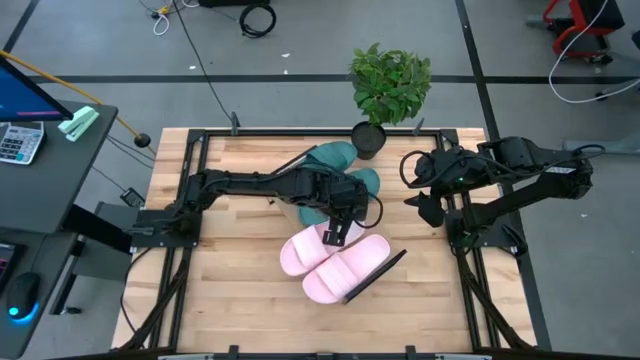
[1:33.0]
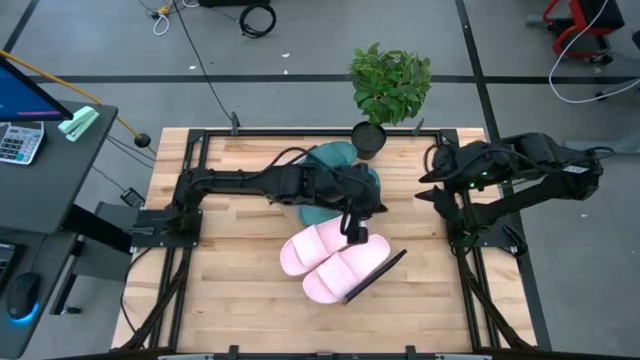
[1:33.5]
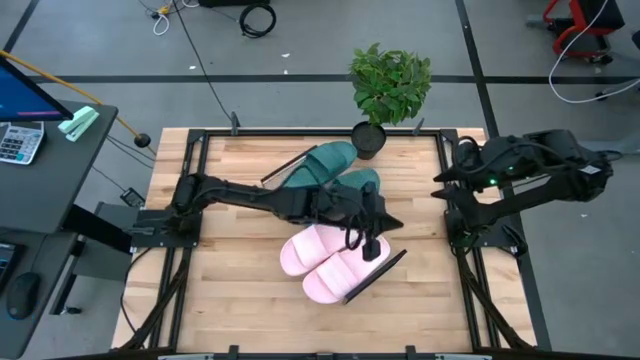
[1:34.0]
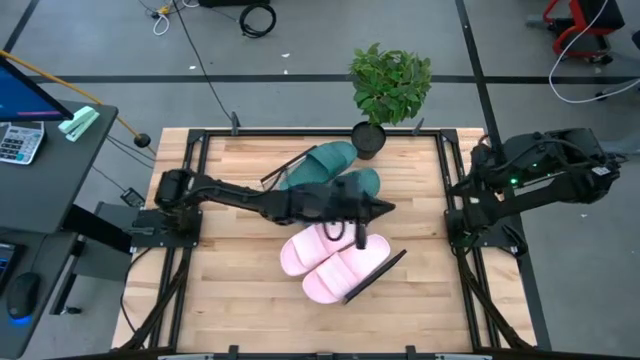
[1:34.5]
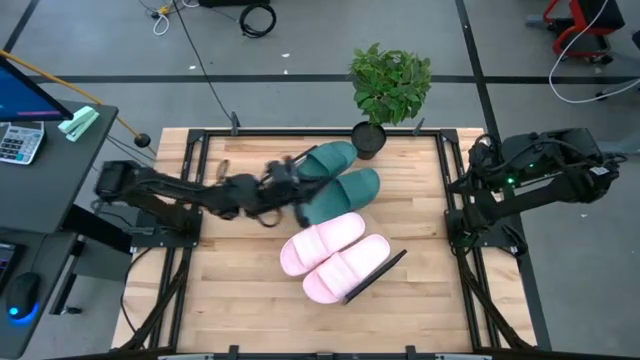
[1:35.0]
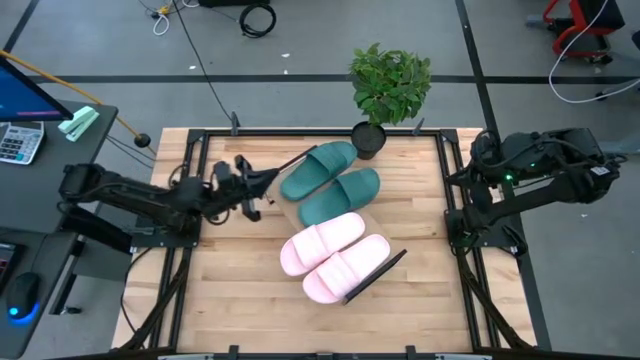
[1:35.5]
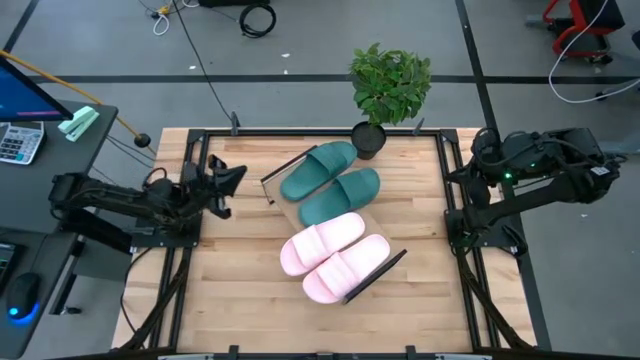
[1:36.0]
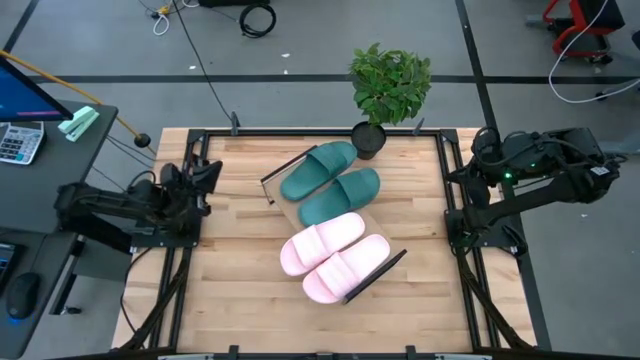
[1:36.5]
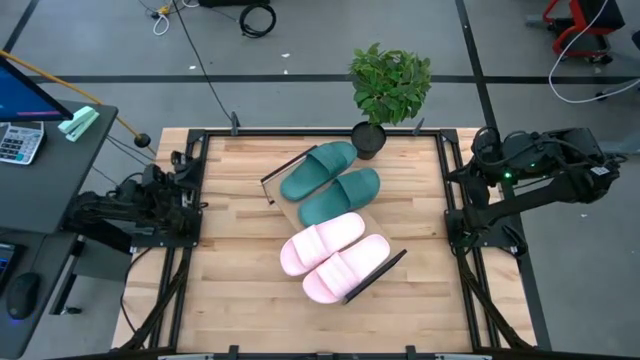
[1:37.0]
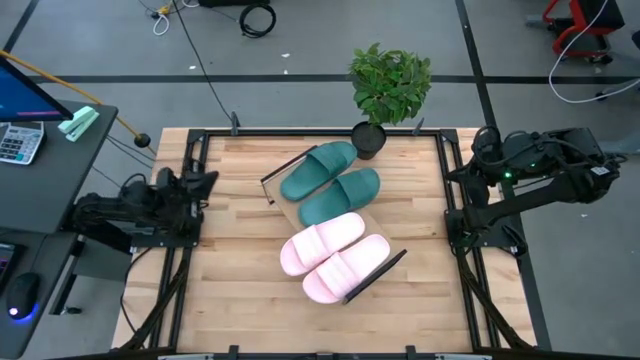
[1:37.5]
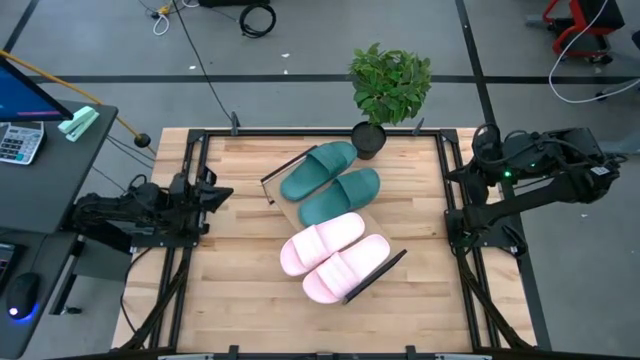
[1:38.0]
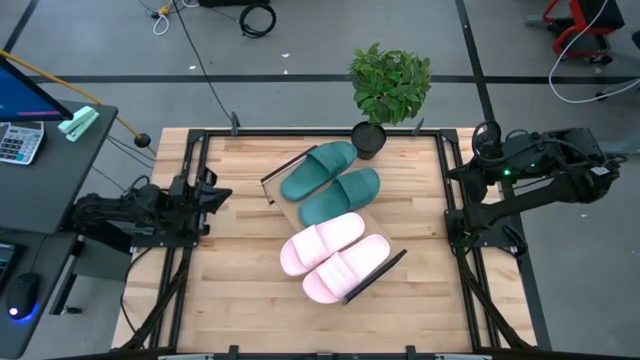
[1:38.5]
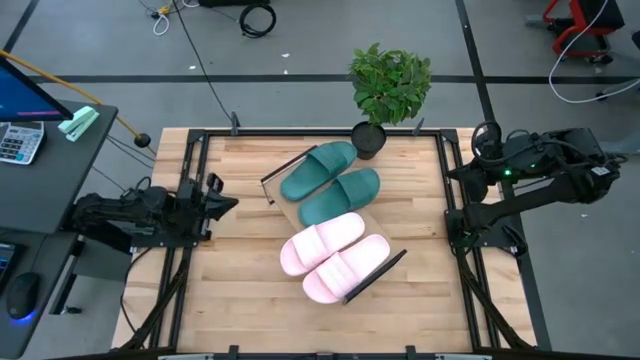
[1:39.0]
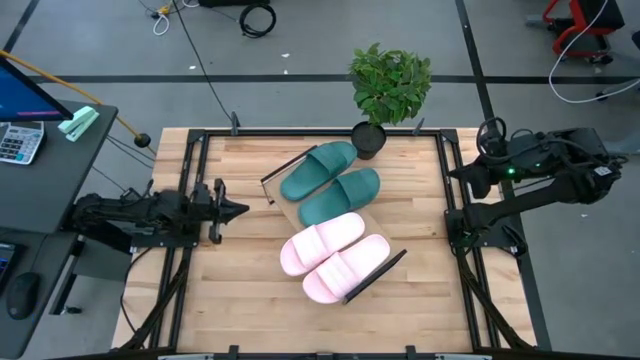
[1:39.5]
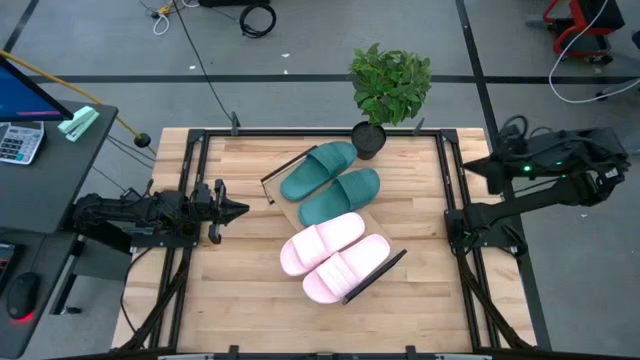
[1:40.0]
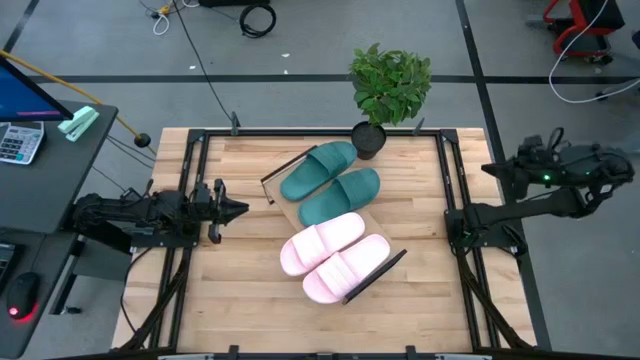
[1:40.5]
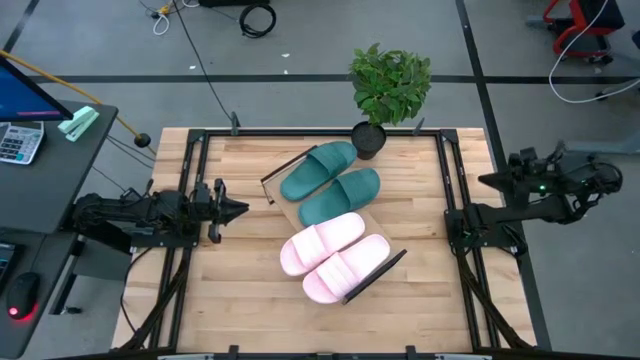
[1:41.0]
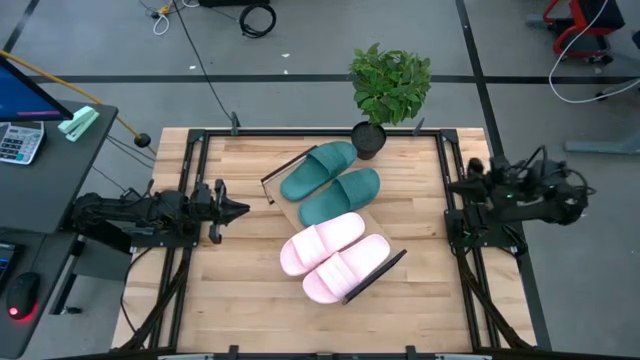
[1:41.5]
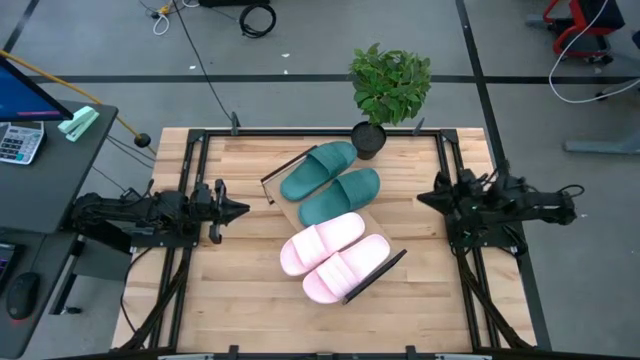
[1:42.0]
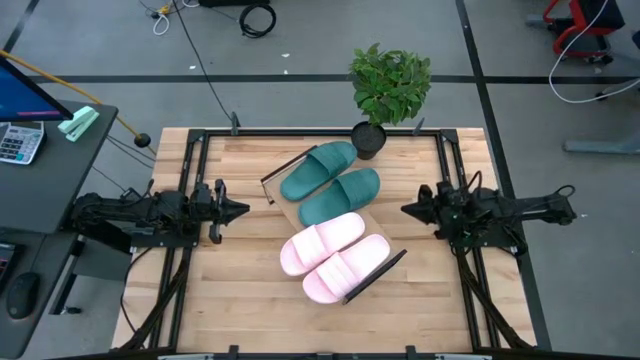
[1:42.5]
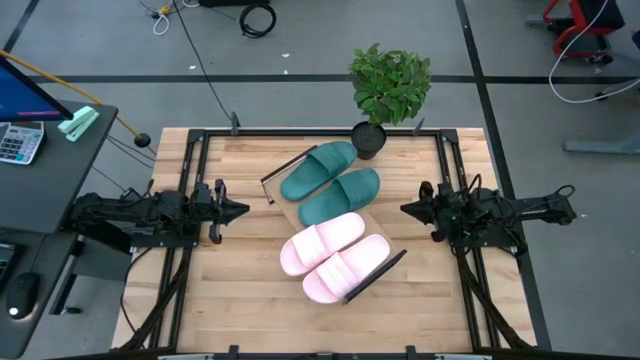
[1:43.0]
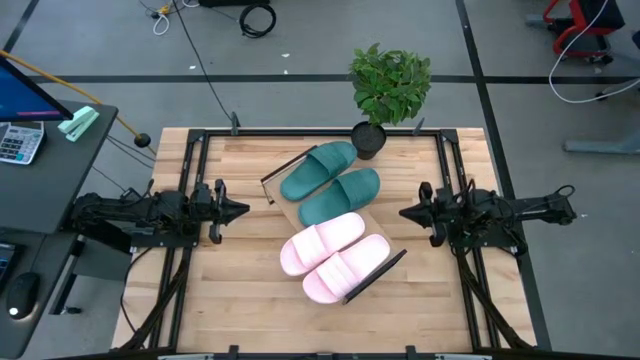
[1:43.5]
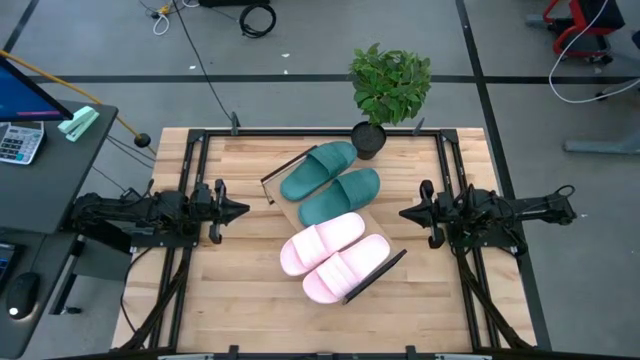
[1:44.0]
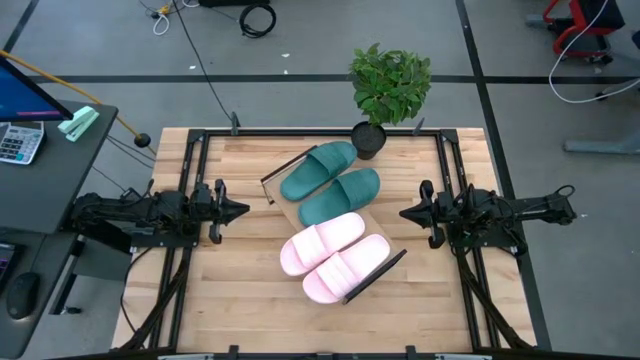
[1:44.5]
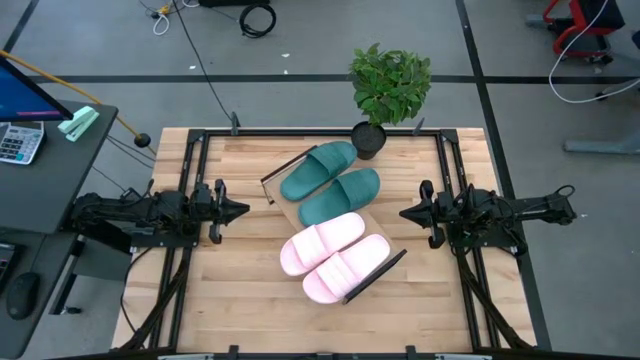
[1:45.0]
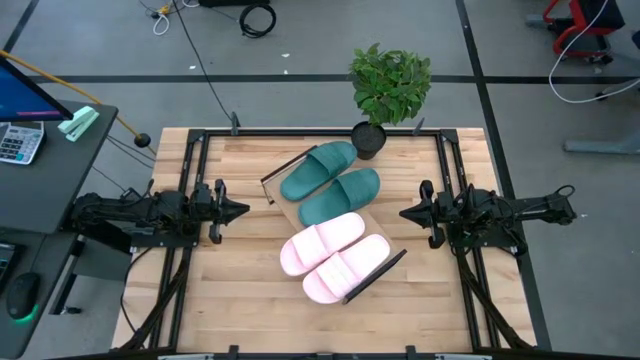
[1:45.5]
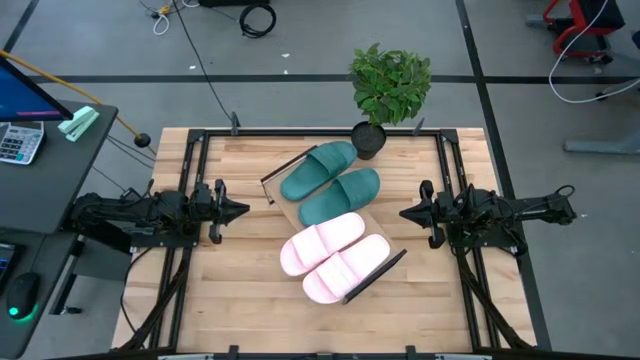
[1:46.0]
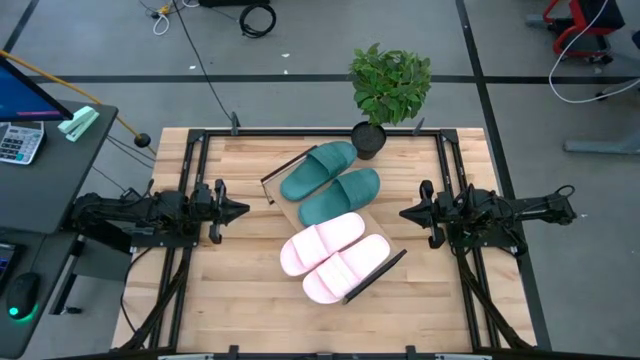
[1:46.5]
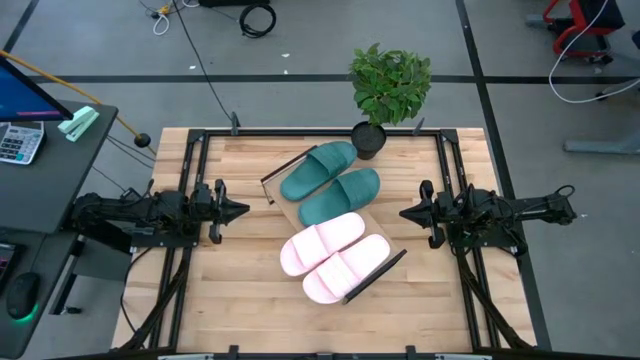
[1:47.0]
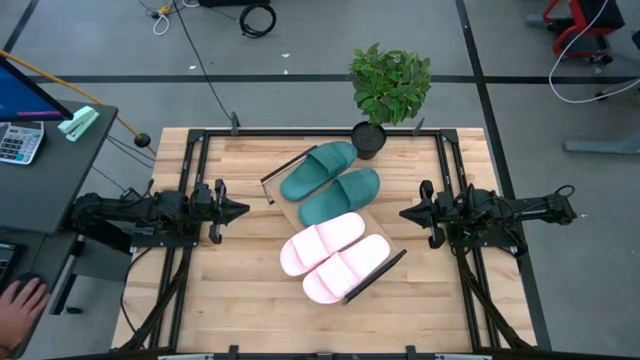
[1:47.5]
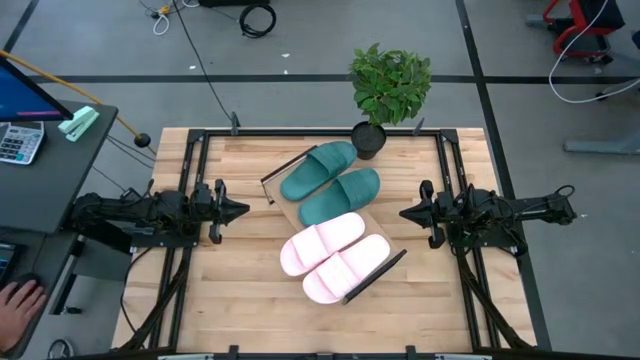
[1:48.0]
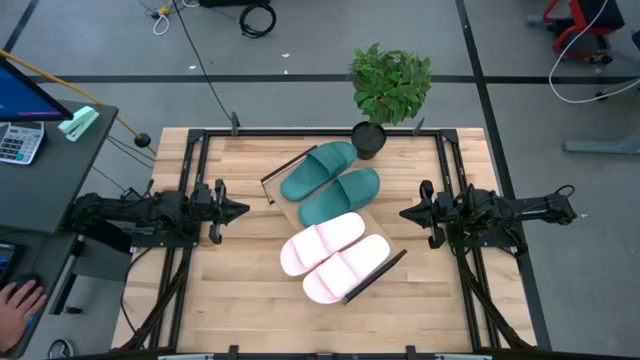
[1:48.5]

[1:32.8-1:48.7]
Task: Pick and place slides into the shelf
Return to Home Position

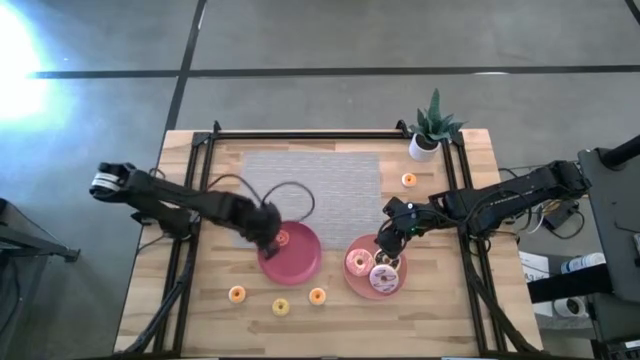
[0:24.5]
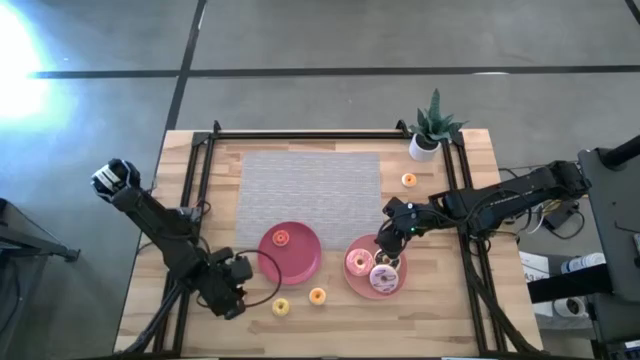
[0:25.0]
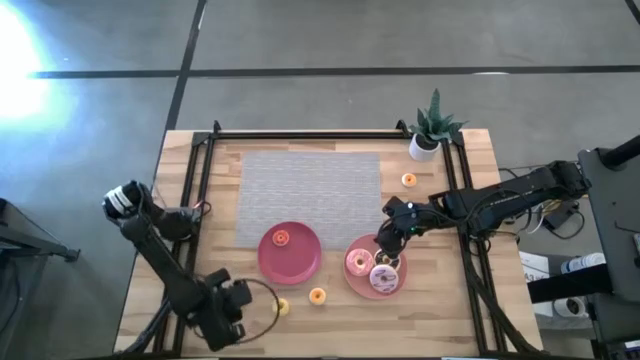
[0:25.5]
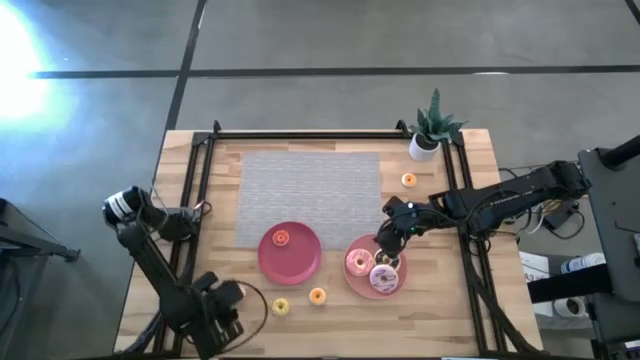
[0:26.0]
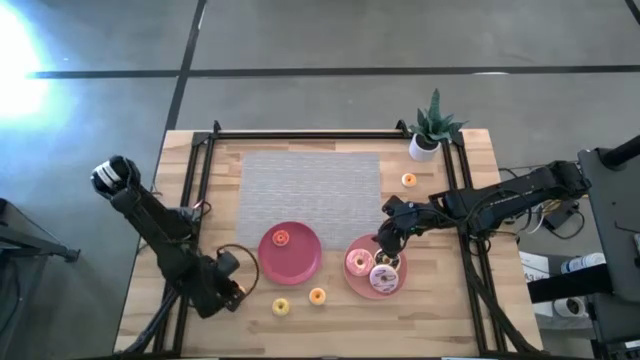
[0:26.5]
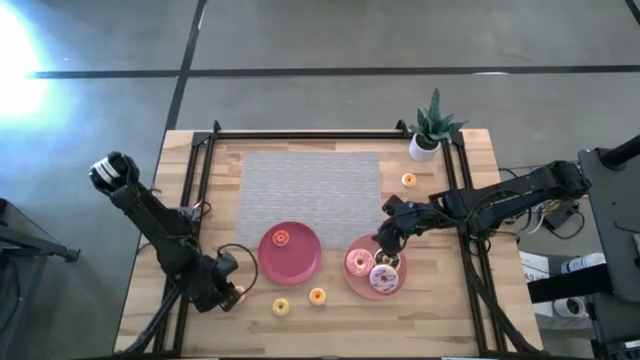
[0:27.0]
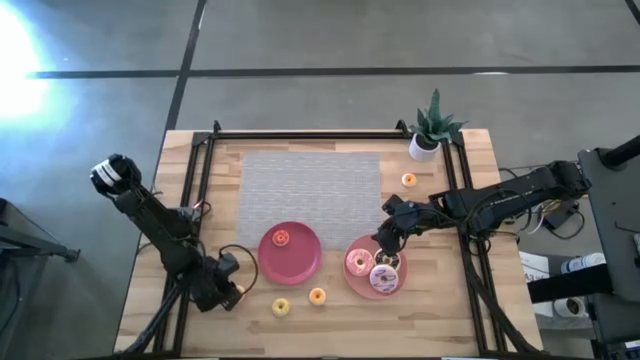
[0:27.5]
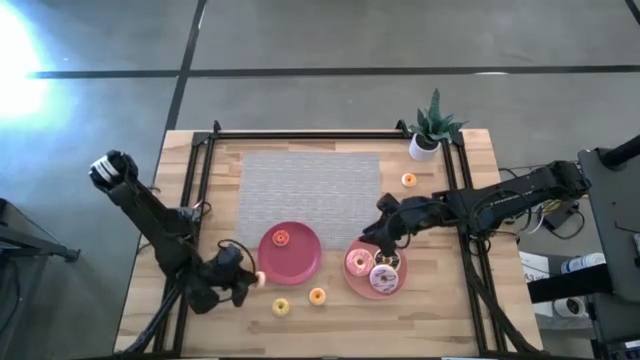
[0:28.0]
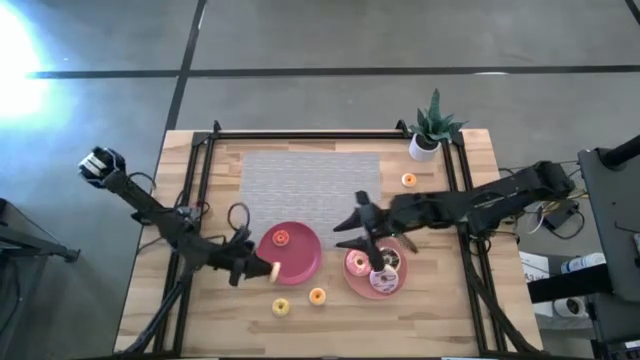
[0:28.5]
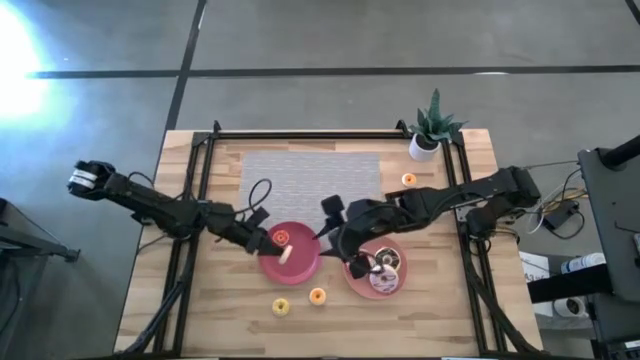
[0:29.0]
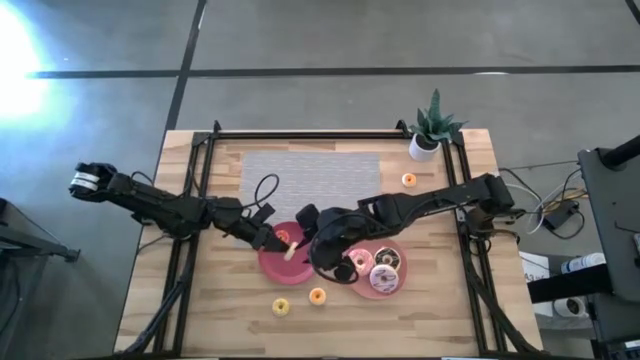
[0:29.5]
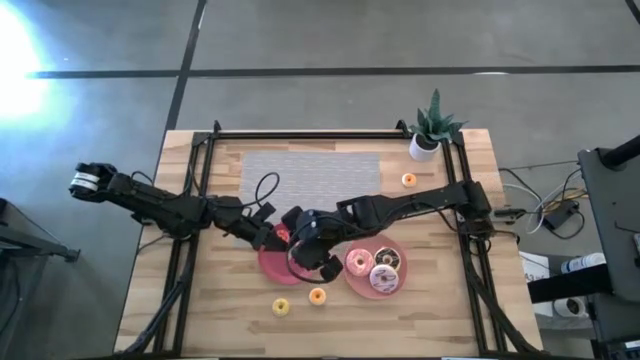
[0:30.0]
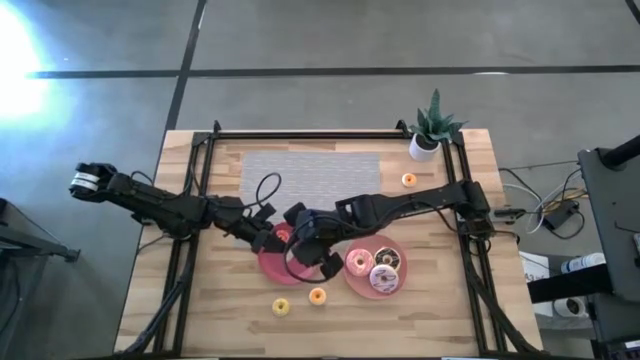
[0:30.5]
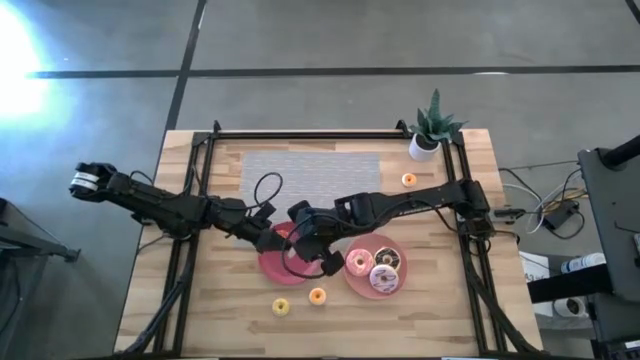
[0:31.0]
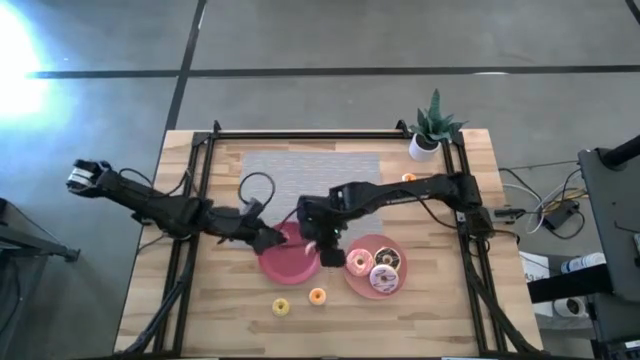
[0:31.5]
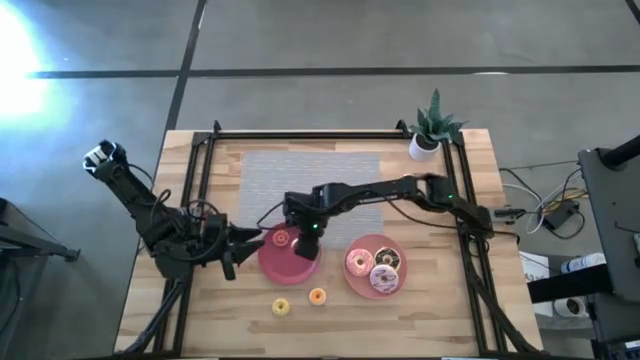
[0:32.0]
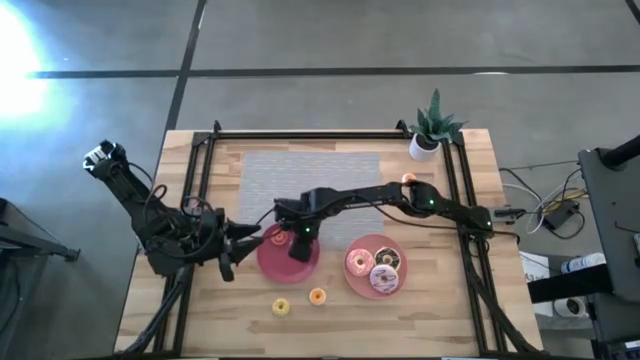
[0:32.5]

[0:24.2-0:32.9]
Task: Pick & Place donuts
Put the red small donut on the dark pink plate
